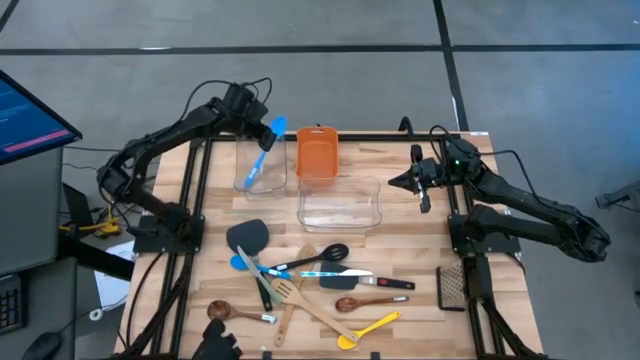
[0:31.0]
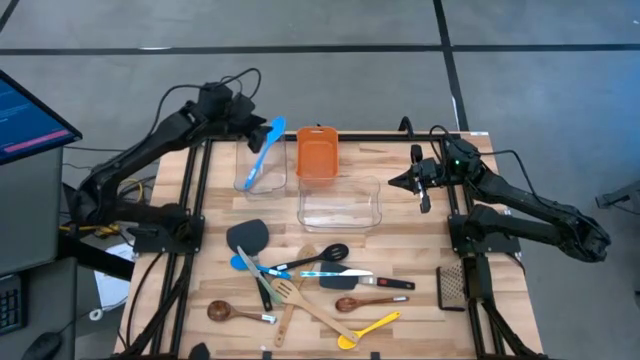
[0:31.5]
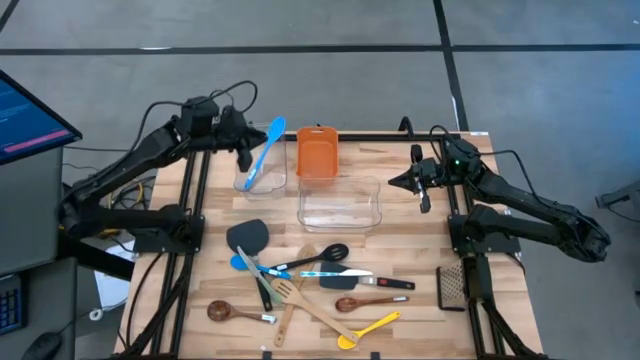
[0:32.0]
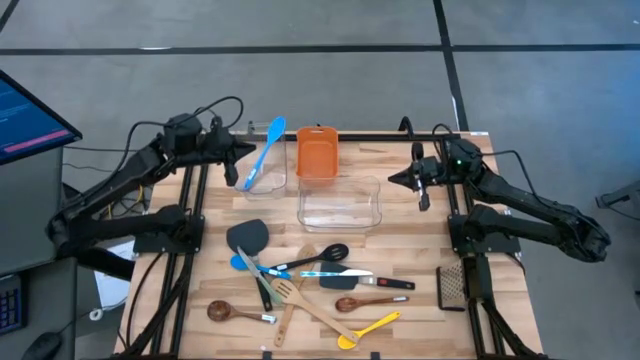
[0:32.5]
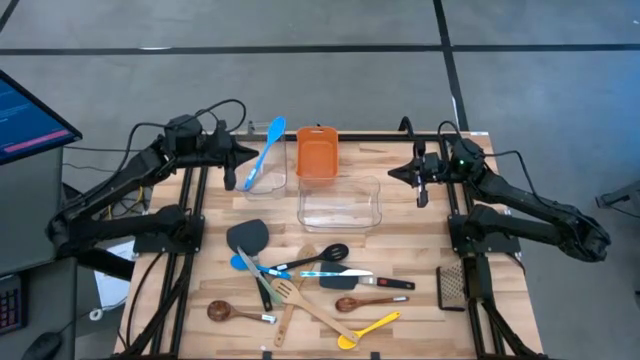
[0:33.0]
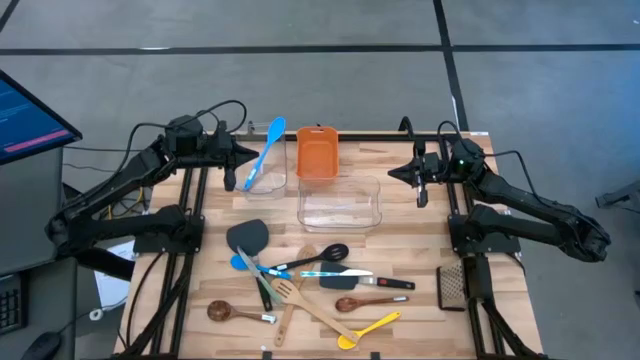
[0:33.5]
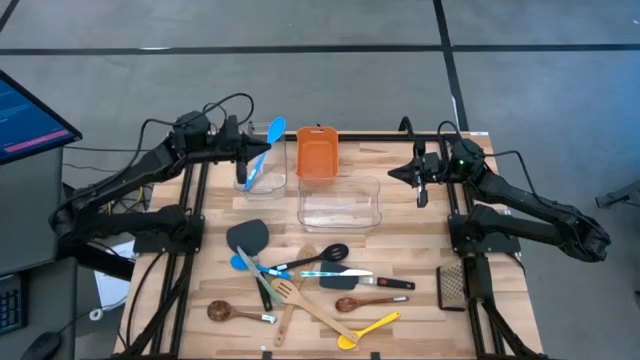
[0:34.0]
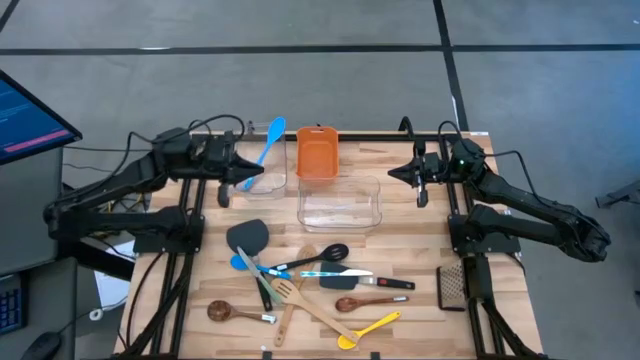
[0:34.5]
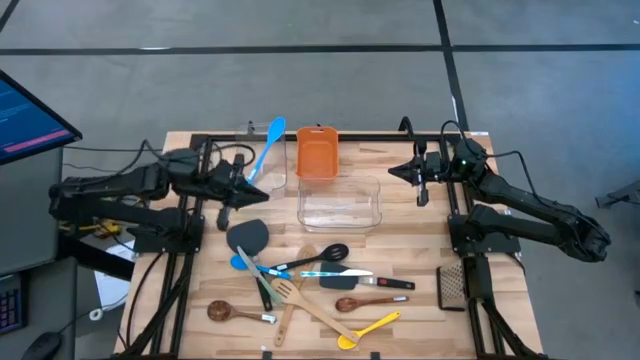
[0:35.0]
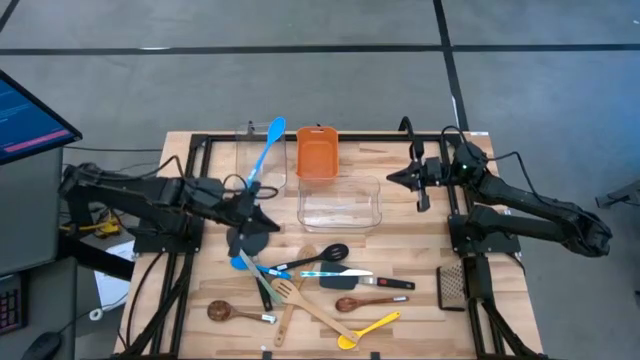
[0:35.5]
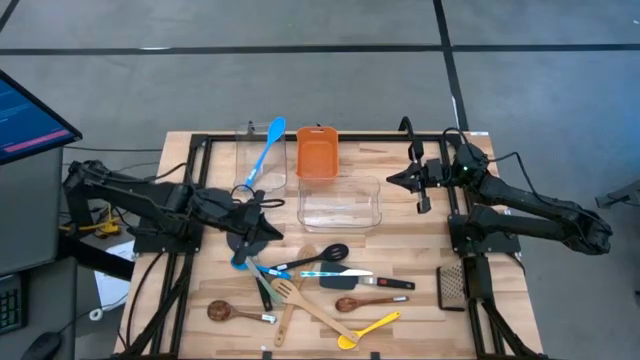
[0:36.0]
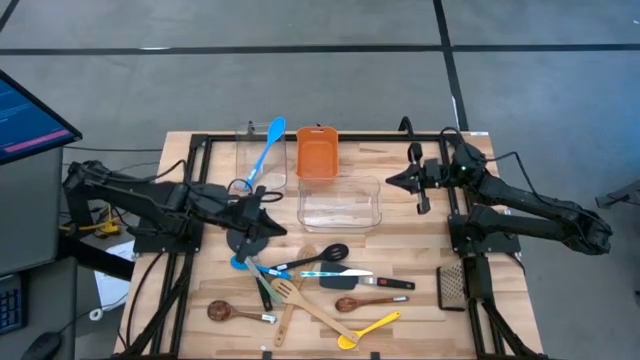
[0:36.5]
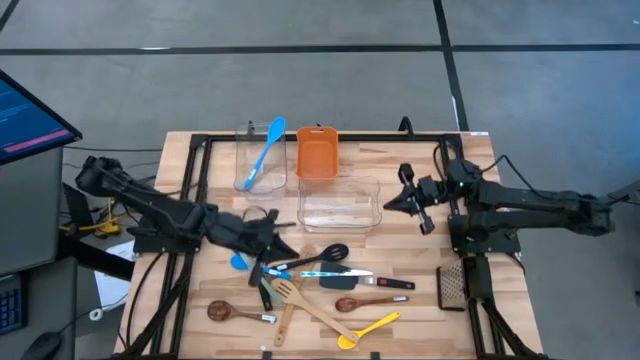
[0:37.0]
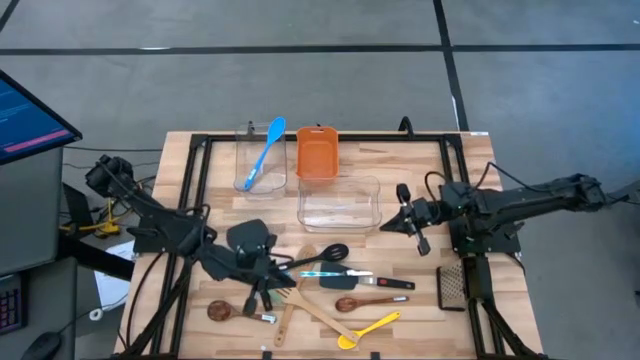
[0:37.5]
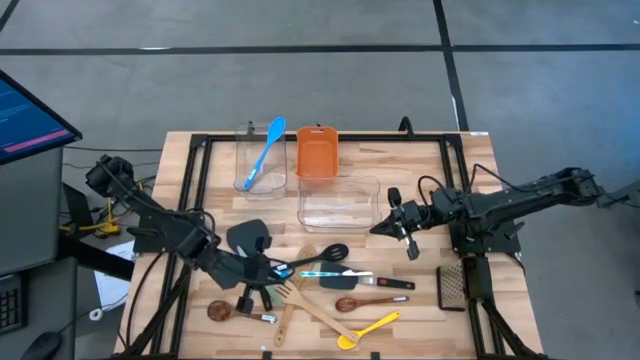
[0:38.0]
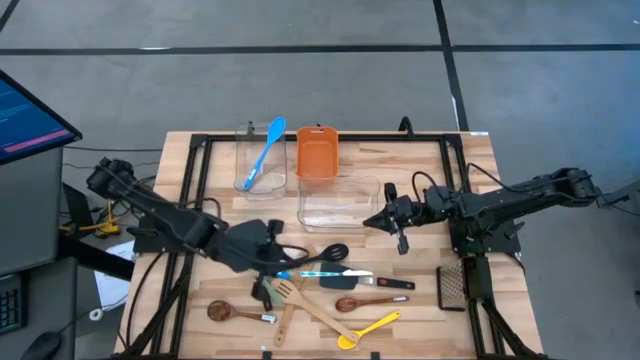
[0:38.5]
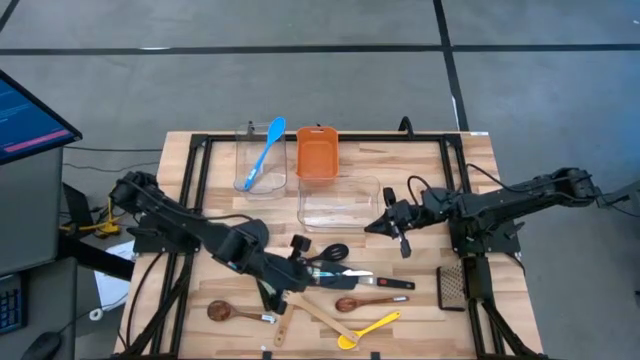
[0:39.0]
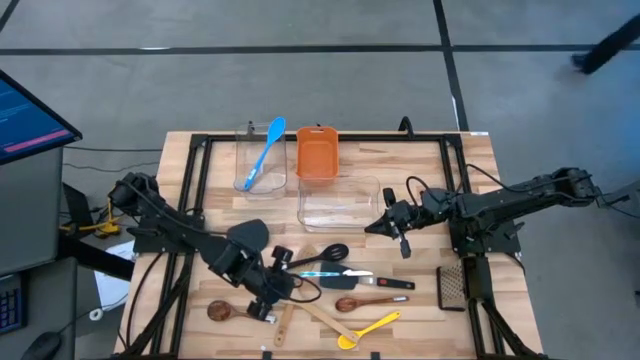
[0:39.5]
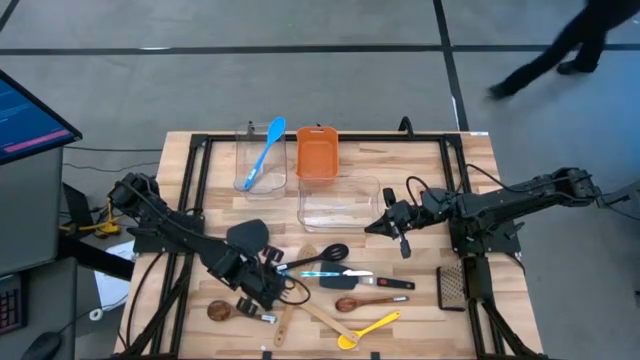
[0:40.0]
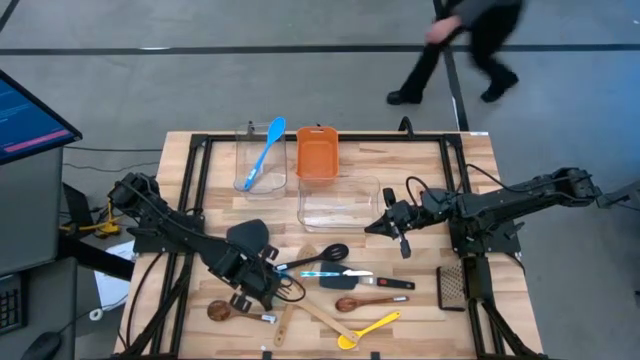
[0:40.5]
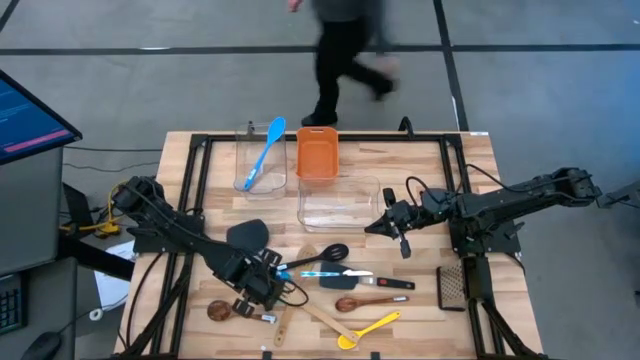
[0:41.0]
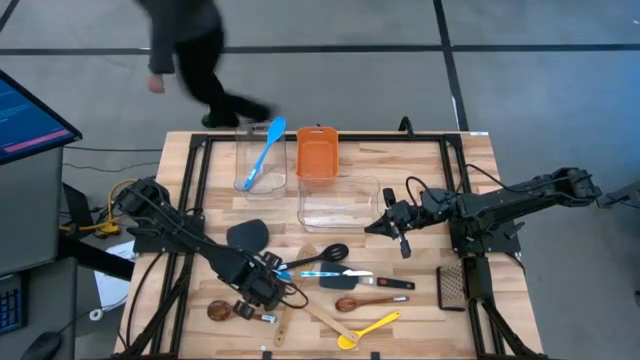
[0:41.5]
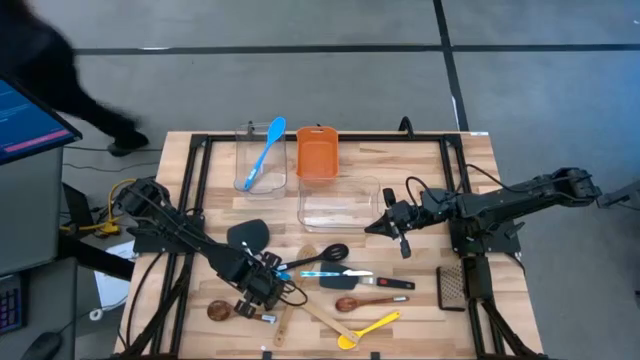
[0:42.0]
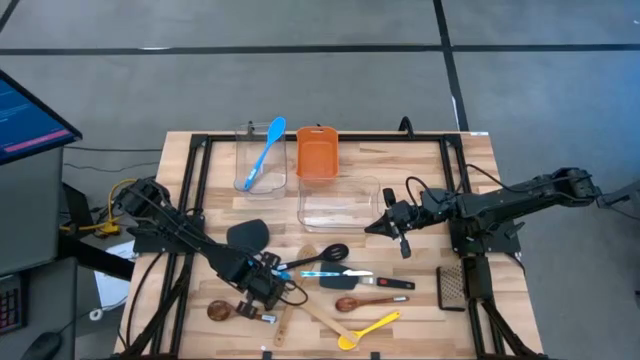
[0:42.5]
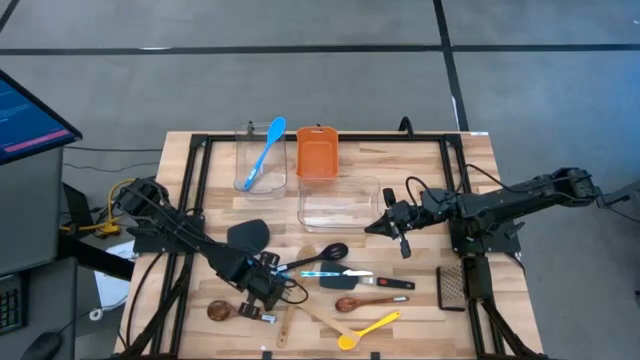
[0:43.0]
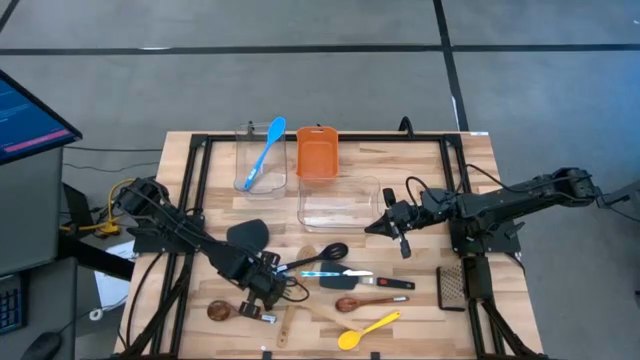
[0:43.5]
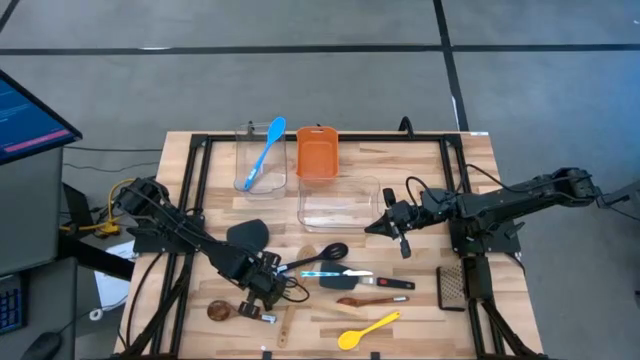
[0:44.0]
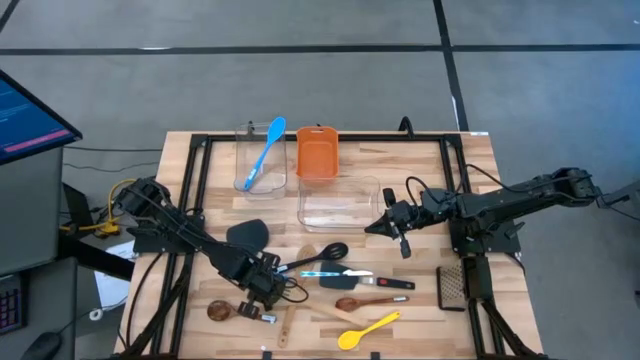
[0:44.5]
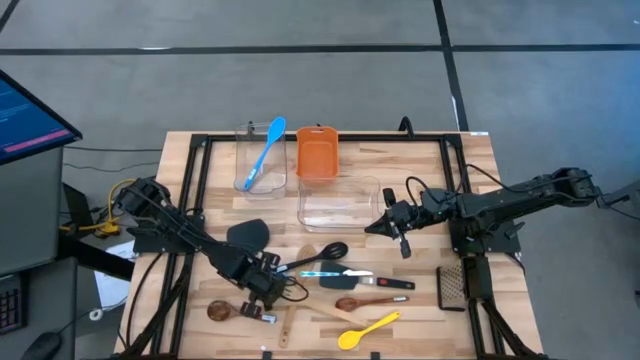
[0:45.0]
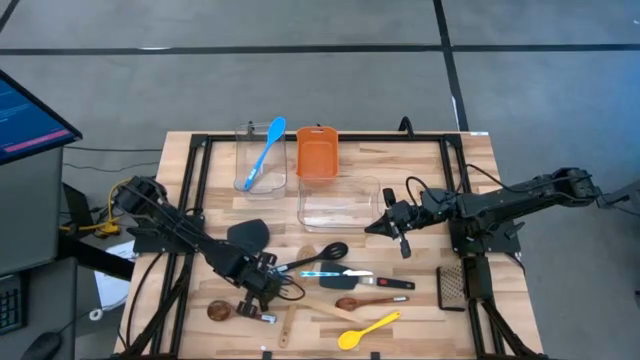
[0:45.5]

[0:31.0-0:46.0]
Task: Pick & Place Kitchen Items
Put the green knife into the orange bin

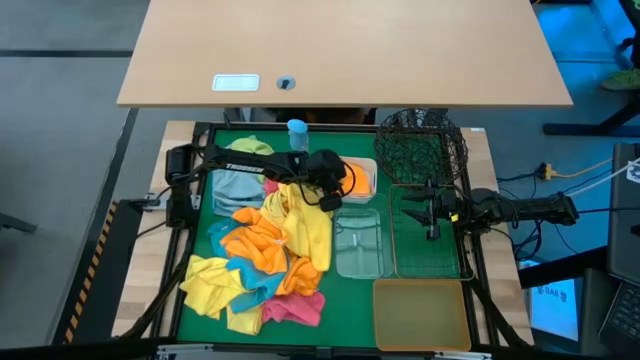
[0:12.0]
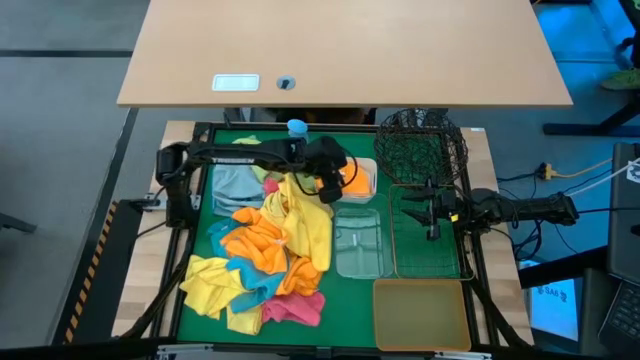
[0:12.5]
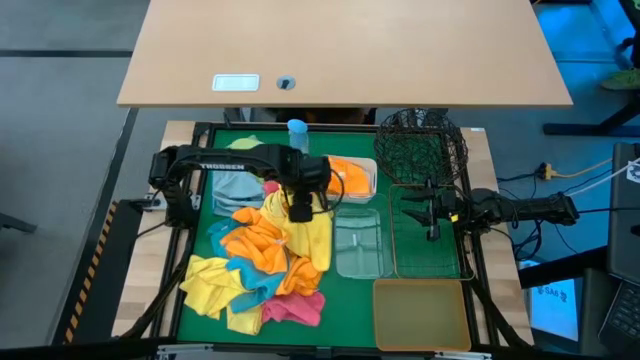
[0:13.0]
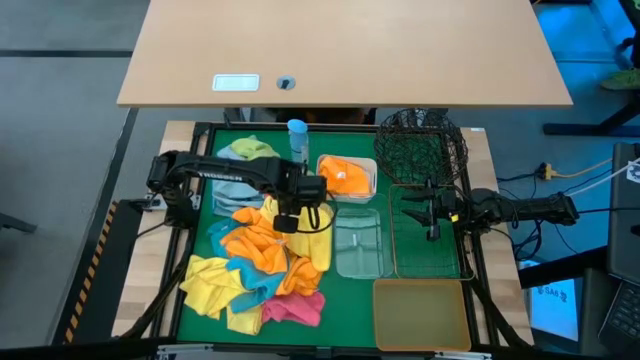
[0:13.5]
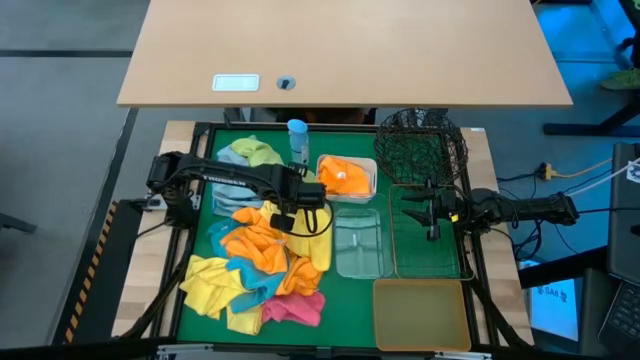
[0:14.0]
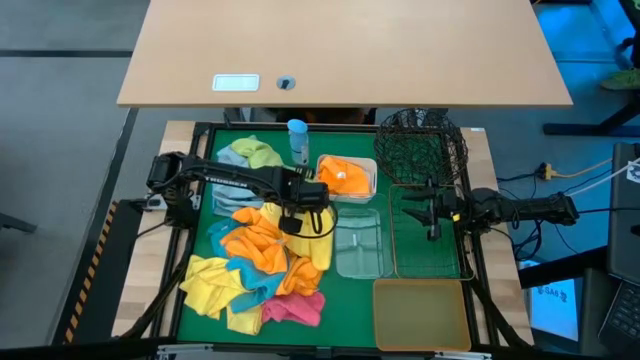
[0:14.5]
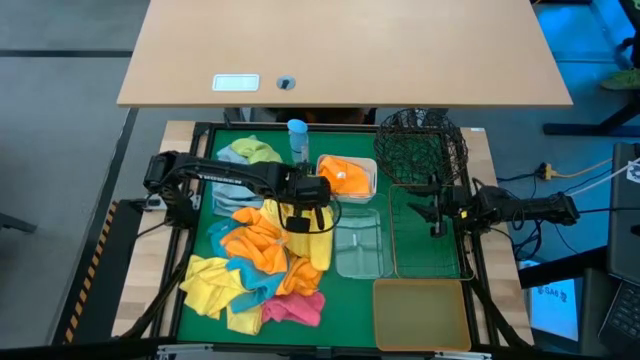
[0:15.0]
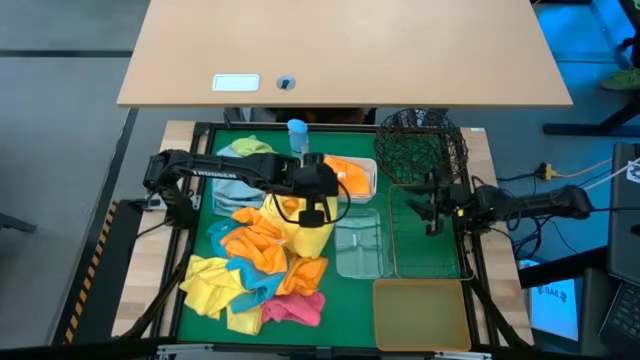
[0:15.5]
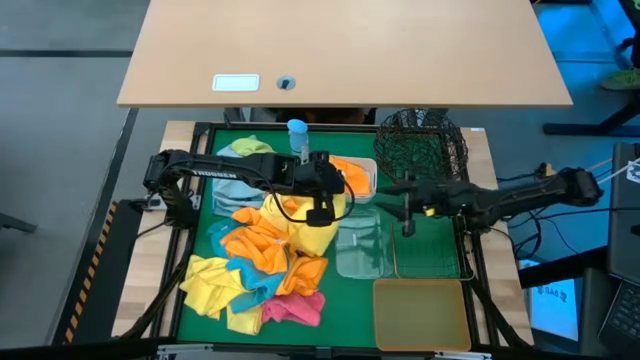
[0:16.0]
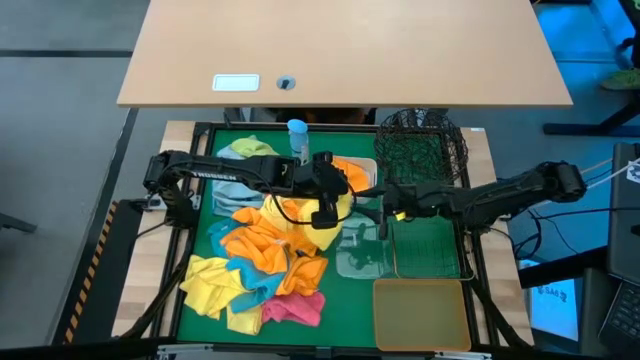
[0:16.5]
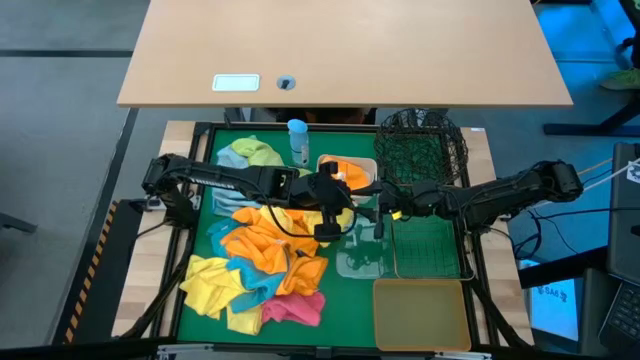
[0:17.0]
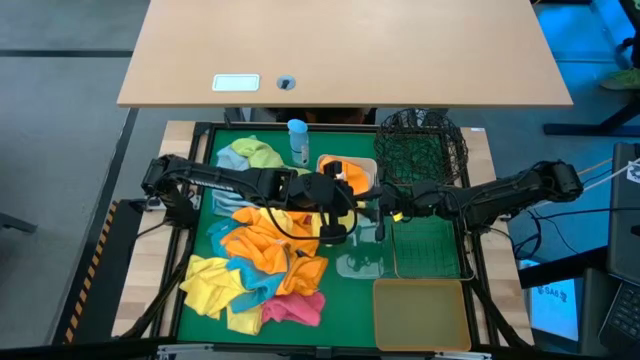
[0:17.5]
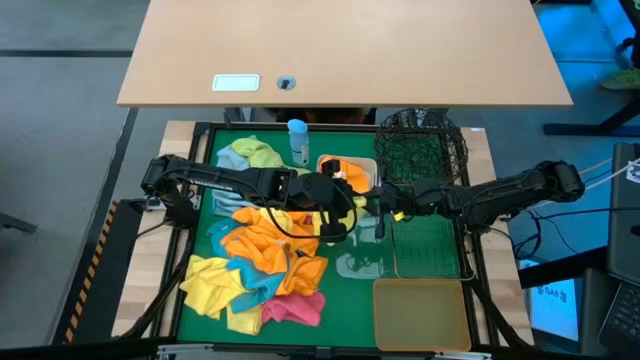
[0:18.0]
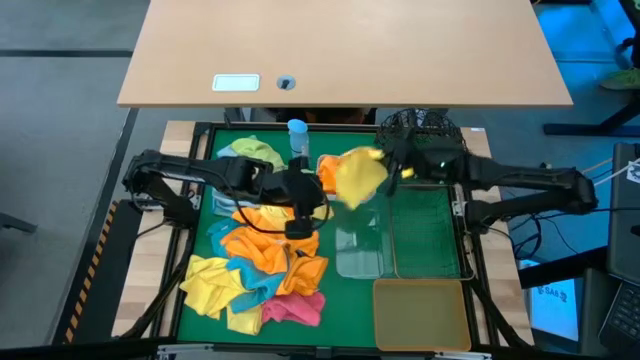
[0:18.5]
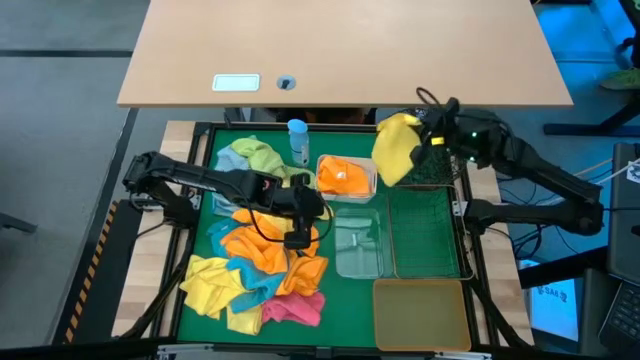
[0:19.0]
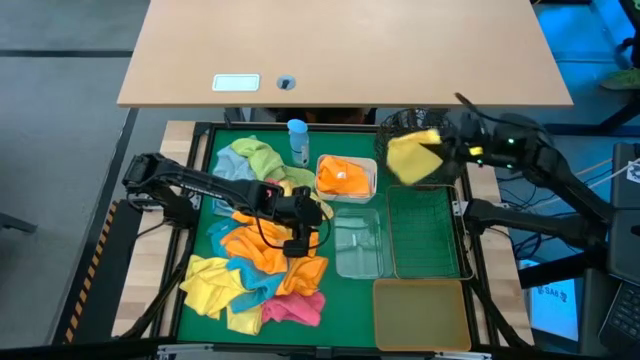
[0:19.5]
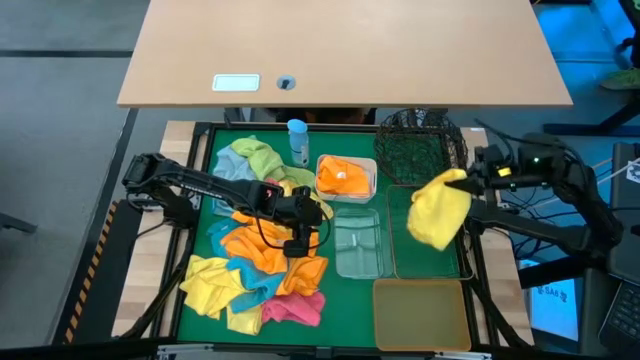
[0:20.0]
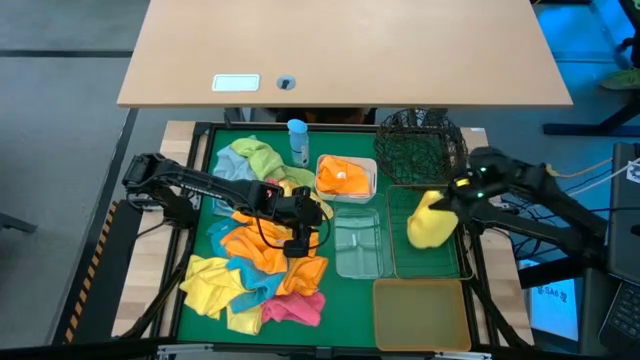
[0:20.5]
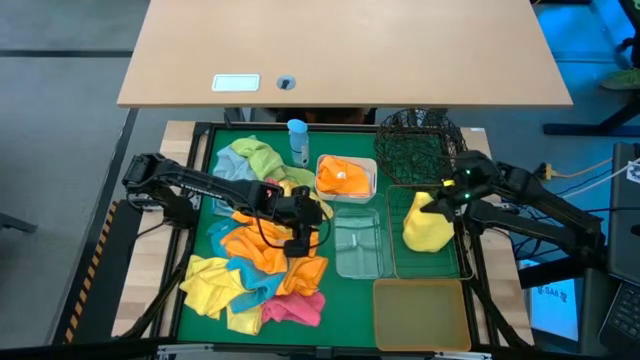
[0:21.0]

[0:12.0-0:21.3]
Task: Sort microfiber towel by color & place in baskets
Put the yellow towel into the gold wire basket
